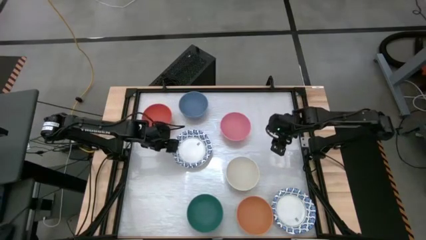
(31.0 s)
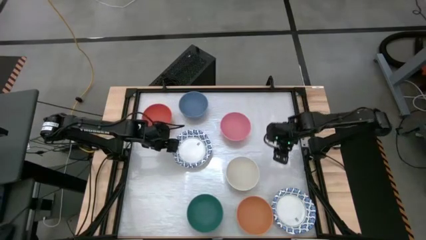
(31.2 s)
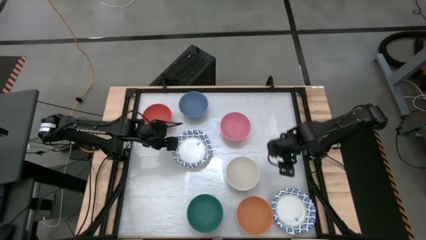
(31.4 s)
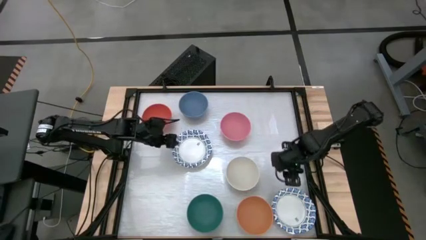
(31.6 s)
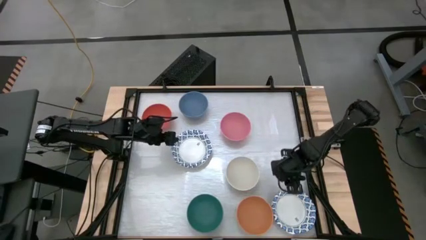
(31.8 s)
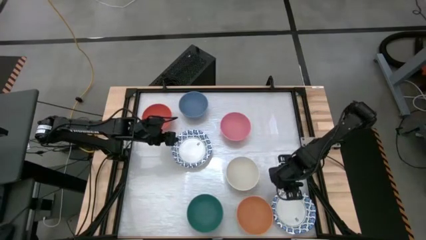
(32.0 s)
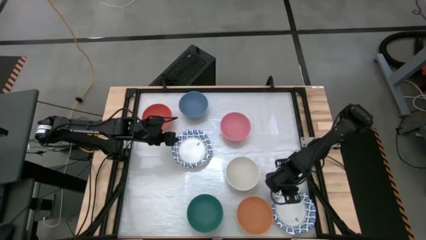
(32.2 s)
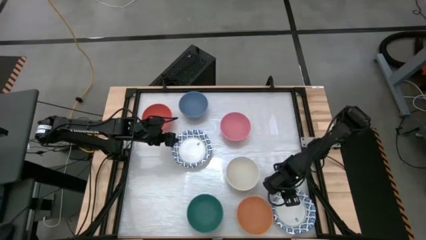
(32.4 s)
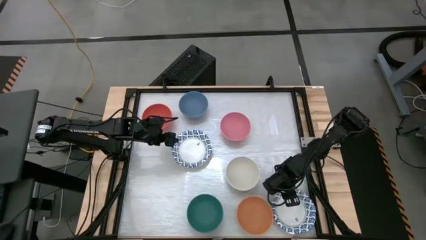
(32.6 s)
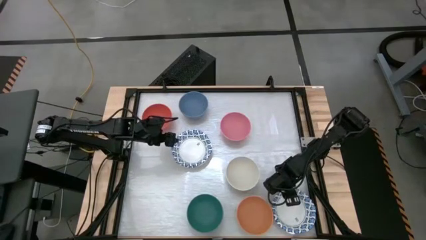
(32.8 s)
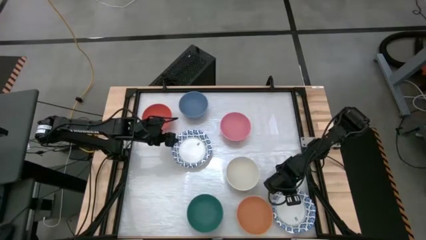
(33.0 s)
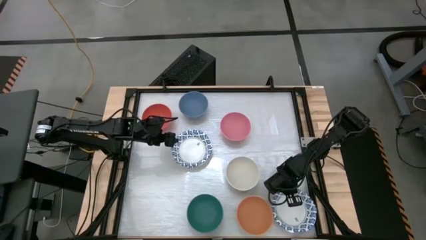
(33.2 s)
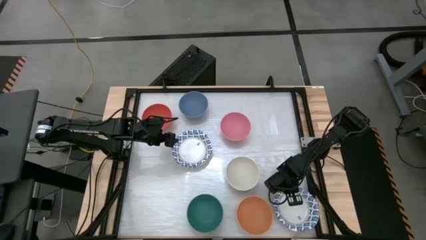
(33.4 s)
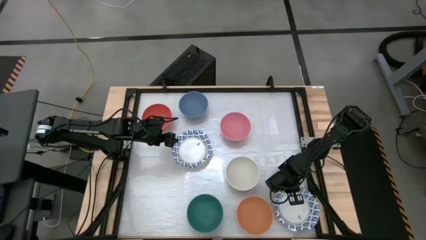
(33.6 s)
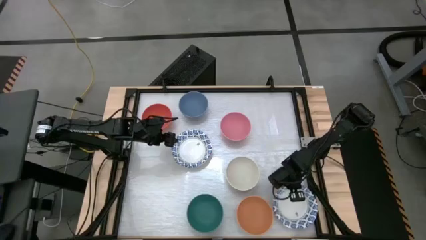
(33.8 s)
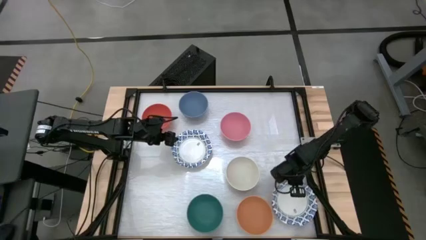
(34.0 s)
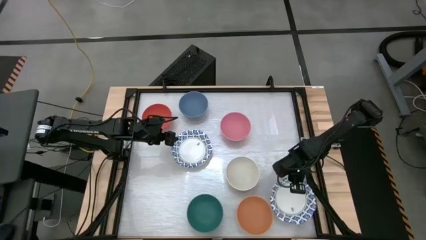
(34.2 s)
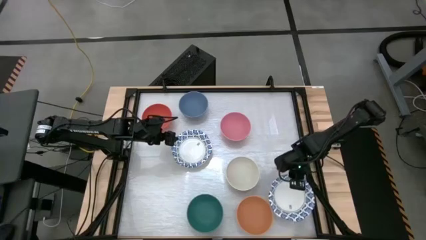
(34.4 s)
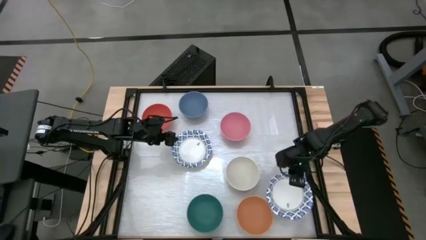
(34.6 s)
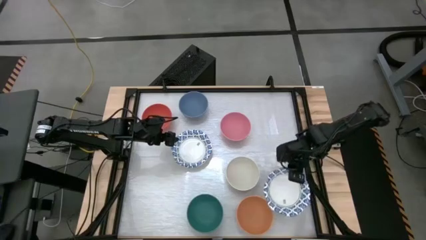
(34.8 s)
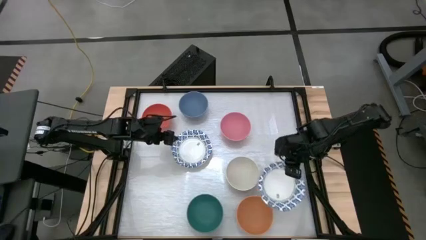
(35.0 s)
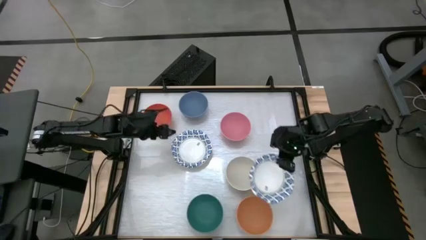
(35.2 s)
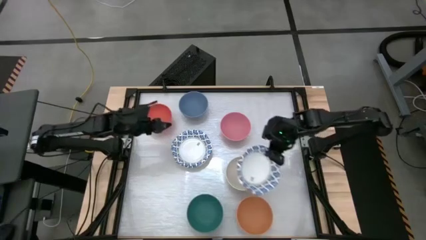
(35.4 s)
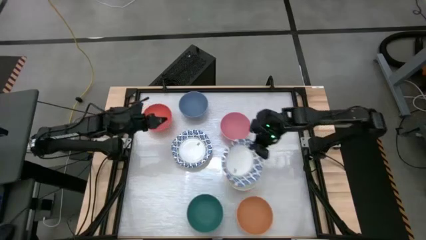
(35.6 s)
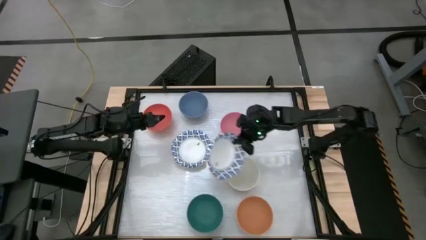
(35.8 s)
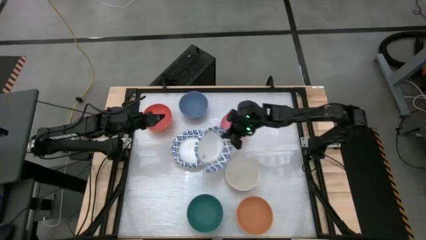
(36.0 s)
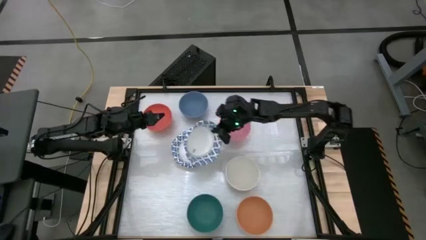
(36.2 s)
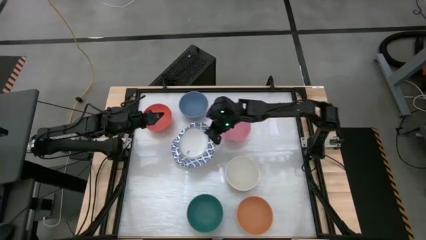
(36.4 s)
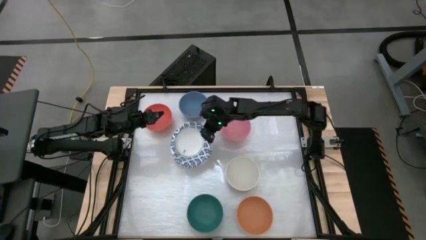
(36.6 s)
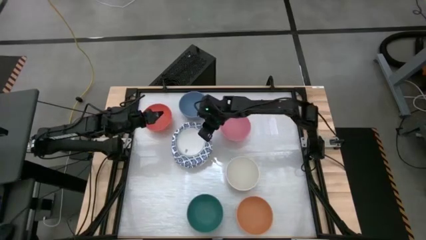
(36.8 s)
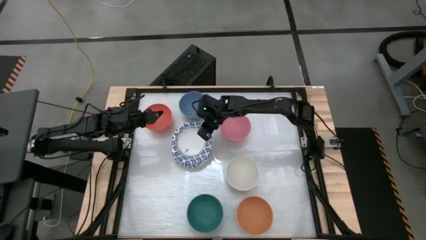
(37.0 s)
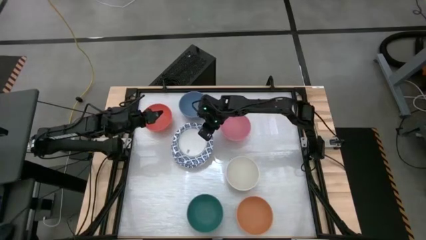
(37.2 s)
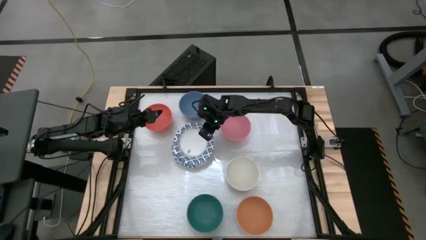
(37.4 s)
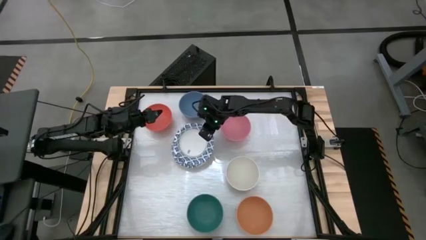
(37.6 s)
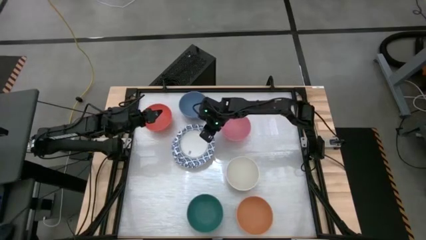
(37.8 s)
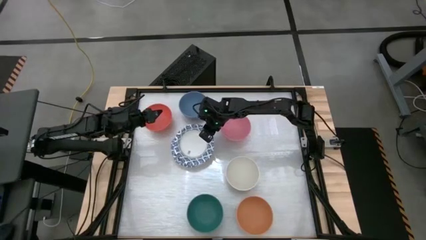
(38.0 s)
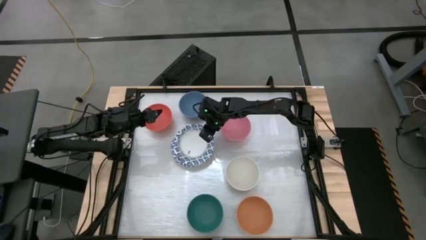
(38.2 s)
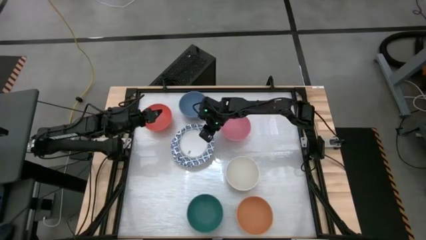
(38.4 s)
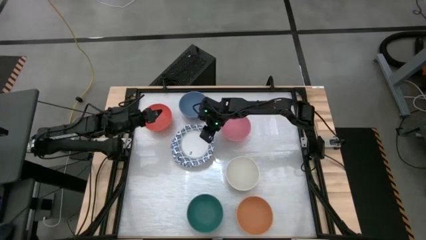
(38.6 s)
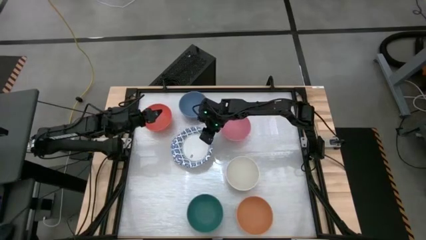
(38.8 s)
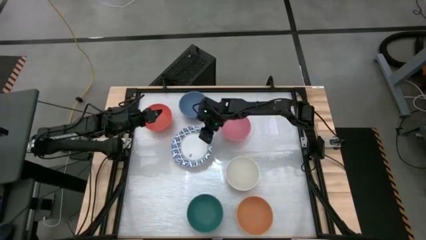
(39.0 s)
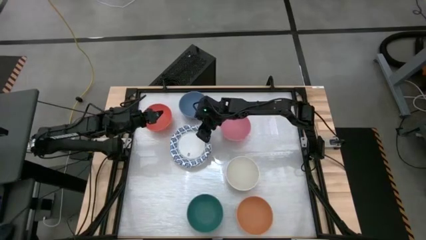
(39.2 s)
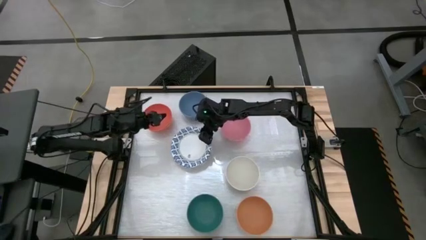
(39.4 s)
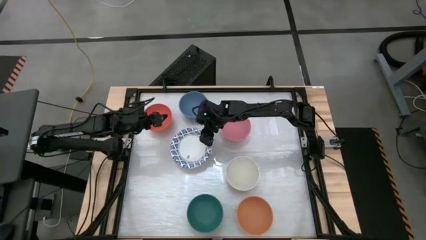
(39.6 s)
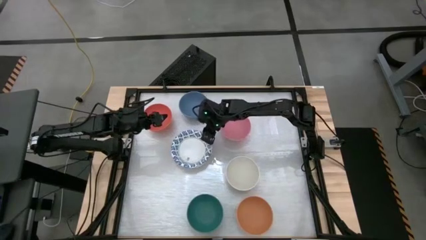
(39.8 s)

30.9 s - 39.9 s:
Stack the blue patterned bowl on top of the blue patterned bowl

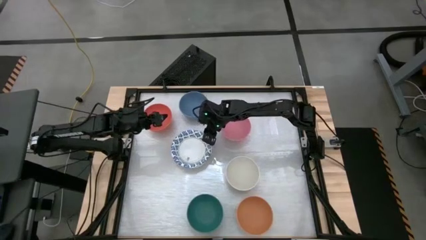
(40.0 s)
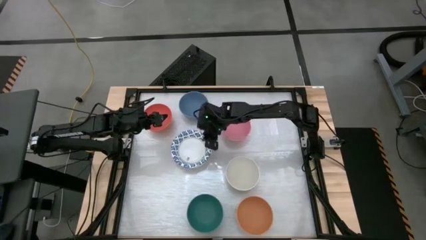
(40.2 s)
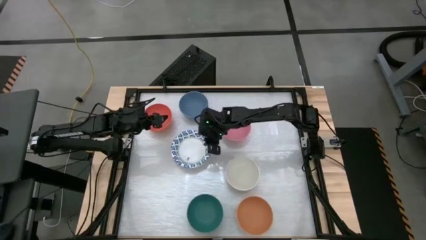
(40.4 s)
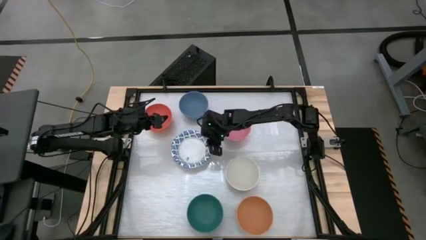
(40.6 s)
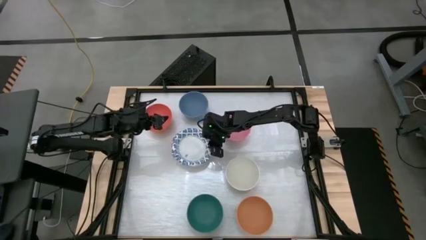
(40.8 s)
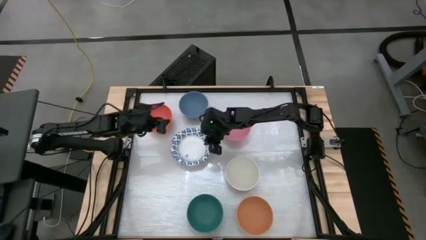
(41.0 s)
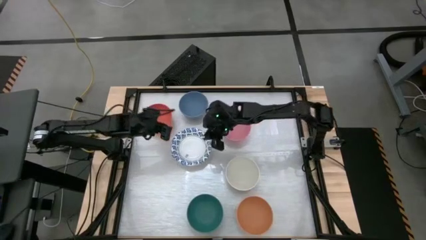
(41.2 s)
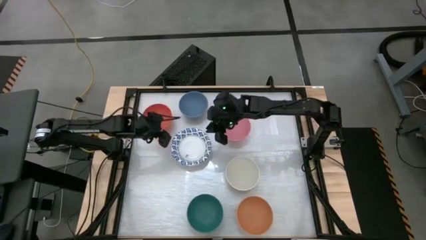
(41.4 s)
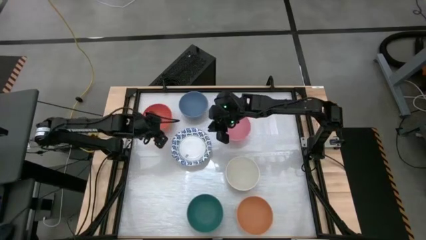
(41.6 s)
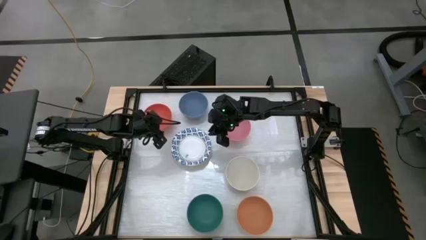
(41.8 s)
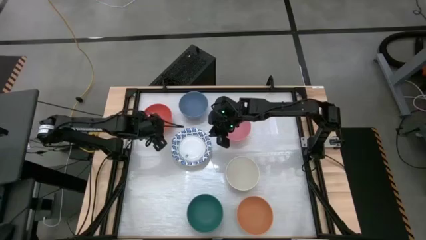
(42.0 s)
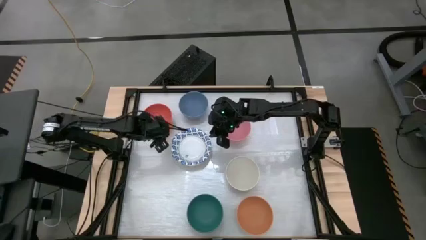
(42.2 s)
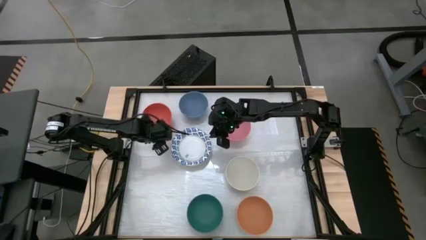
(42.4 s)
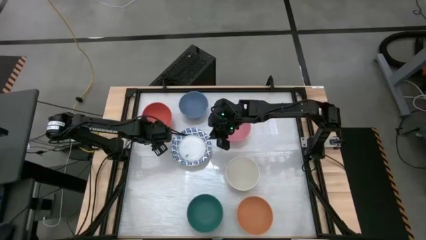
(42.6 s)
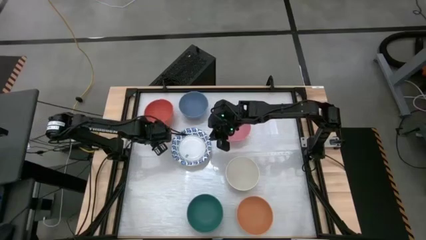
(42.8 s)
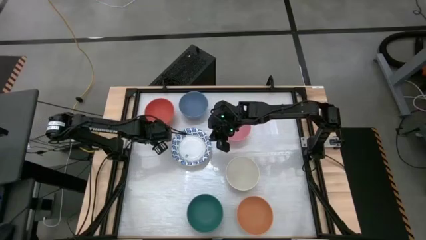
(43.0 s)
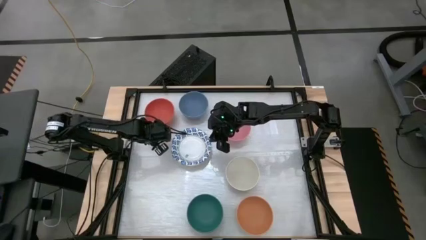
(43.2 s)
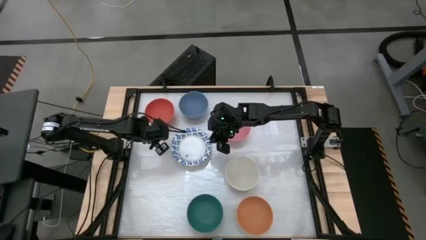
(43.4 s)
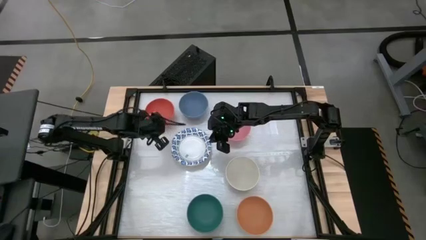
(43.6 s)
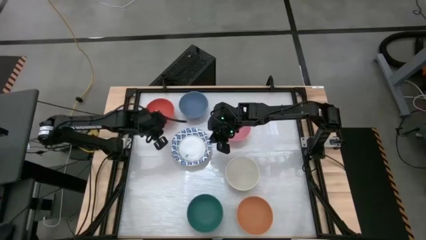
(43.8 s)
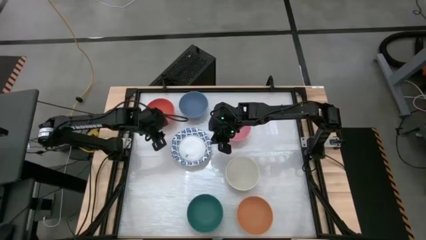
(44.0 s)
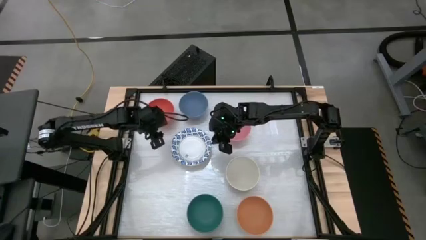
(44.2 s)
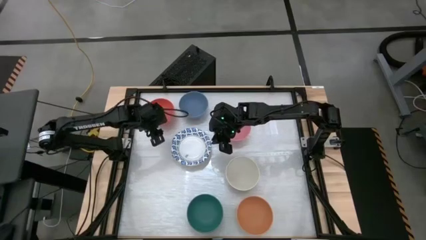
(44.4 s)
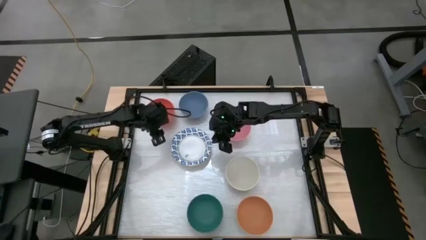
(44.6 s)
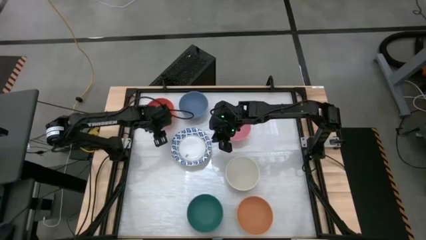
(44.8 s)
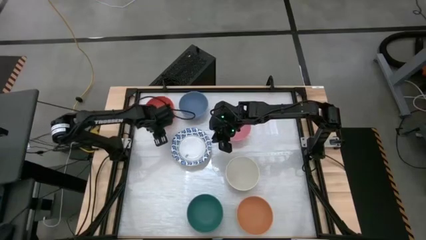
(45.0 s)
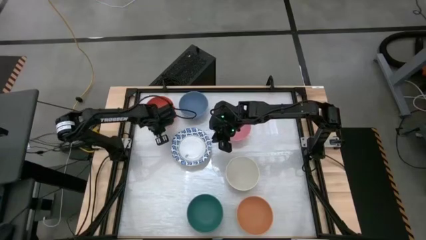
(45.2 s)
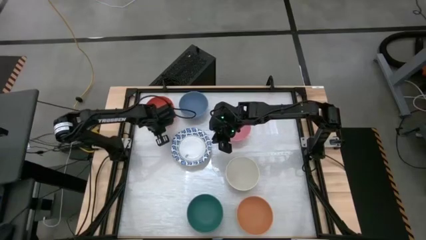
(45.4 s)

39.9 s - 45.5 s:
Stack the red bowl on top of the blue patterned bowl
